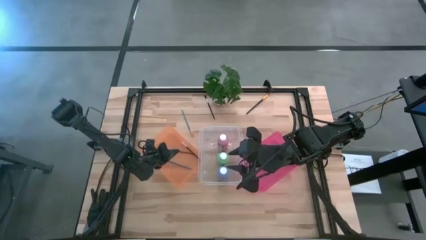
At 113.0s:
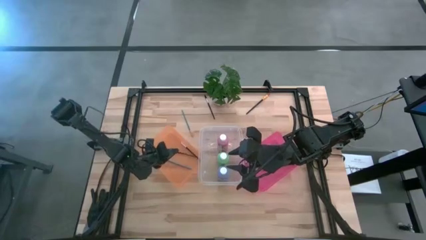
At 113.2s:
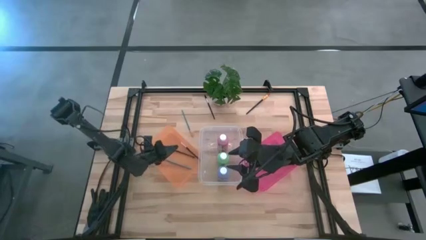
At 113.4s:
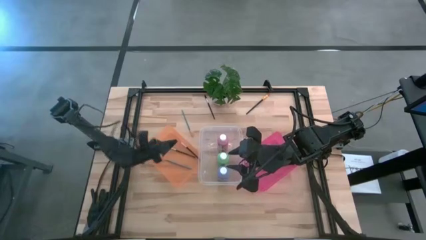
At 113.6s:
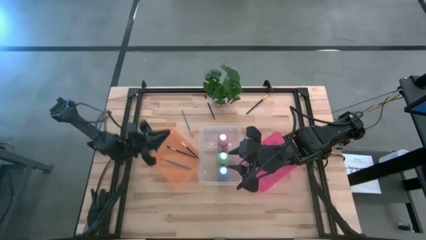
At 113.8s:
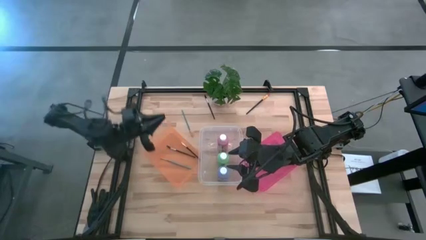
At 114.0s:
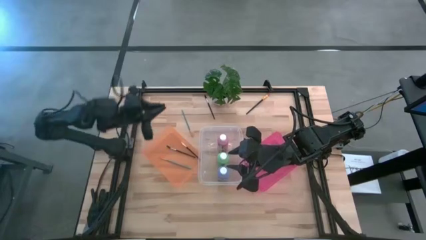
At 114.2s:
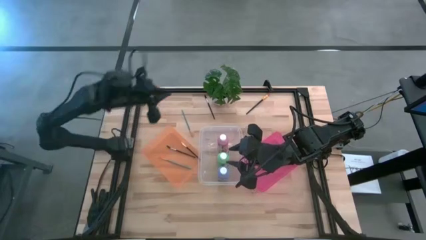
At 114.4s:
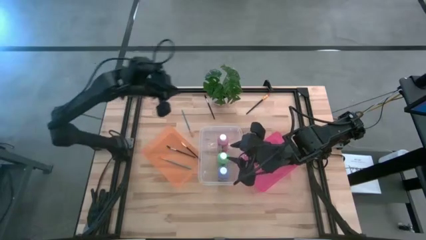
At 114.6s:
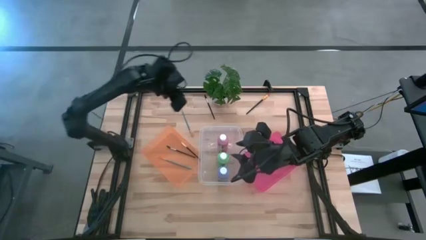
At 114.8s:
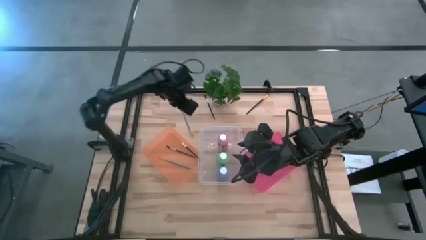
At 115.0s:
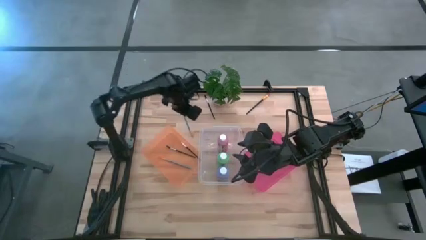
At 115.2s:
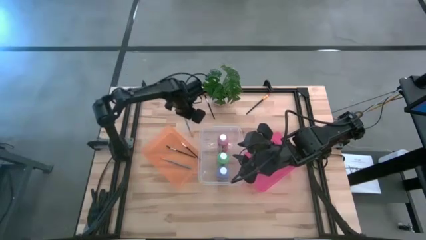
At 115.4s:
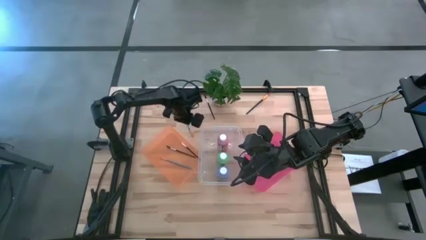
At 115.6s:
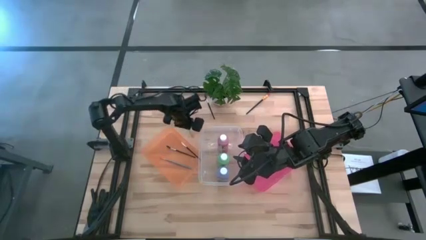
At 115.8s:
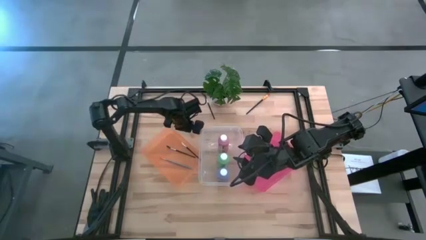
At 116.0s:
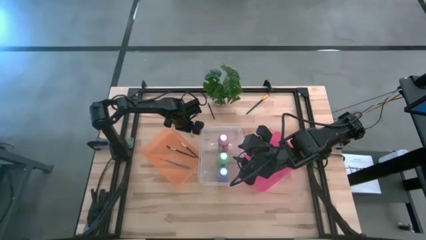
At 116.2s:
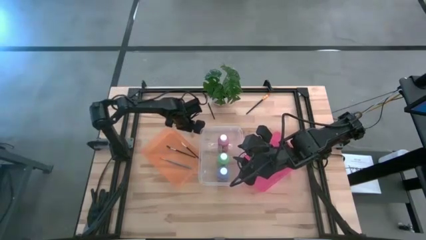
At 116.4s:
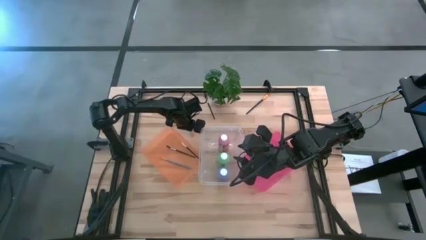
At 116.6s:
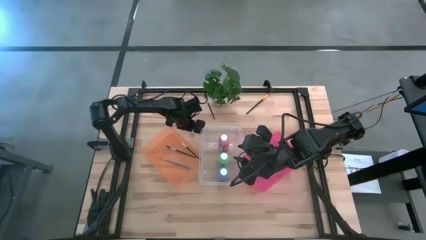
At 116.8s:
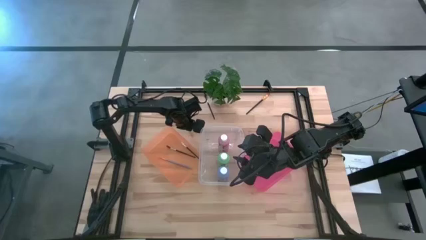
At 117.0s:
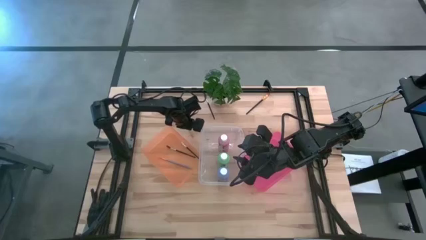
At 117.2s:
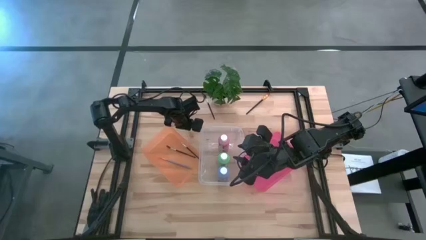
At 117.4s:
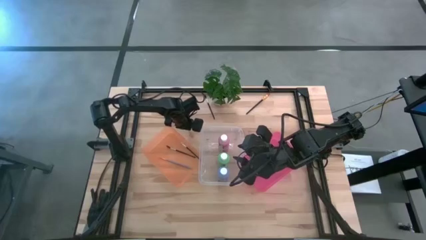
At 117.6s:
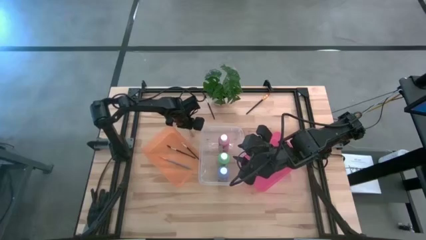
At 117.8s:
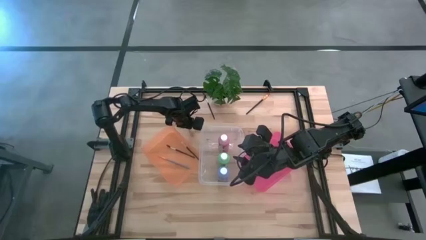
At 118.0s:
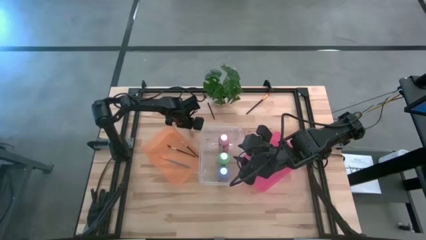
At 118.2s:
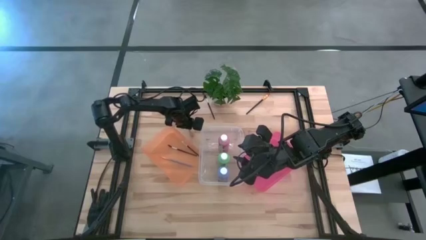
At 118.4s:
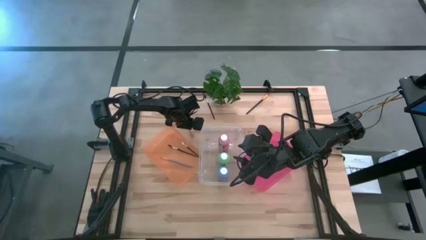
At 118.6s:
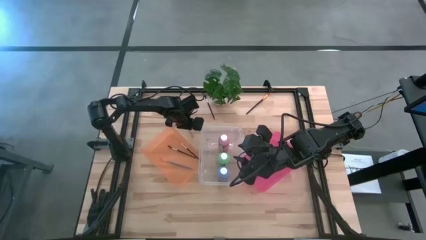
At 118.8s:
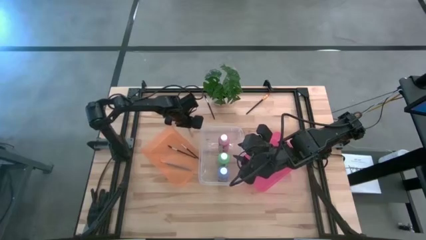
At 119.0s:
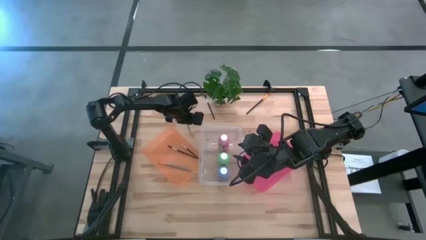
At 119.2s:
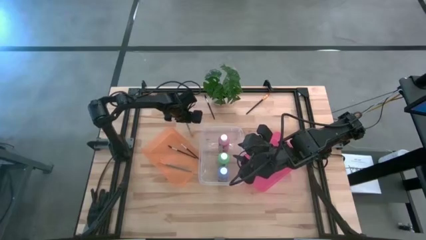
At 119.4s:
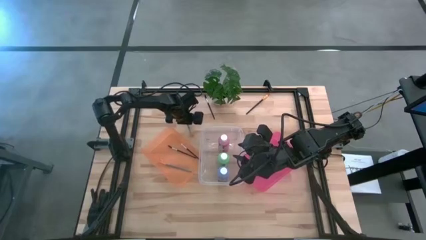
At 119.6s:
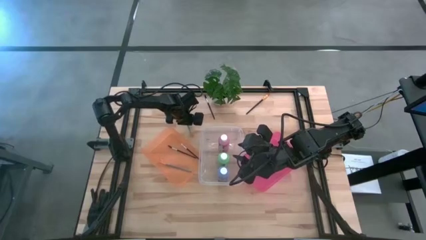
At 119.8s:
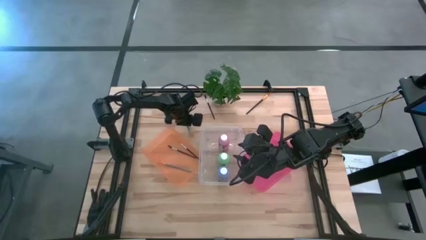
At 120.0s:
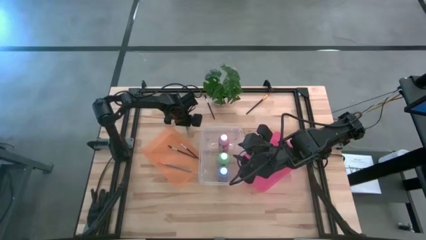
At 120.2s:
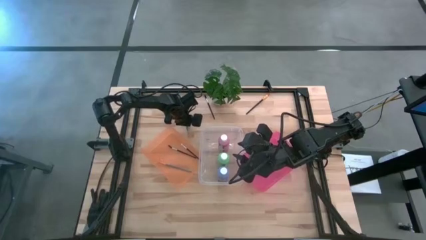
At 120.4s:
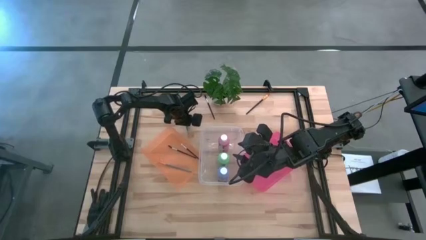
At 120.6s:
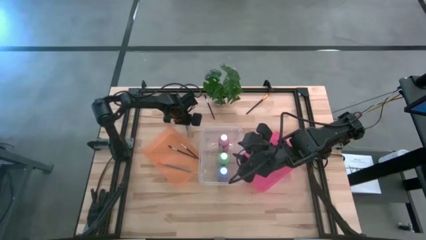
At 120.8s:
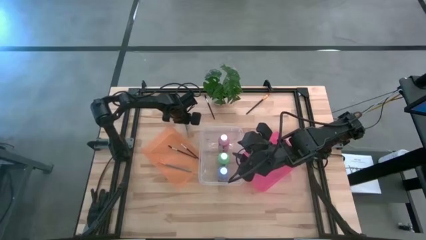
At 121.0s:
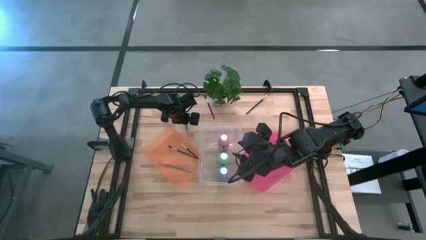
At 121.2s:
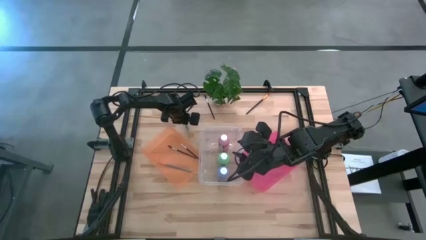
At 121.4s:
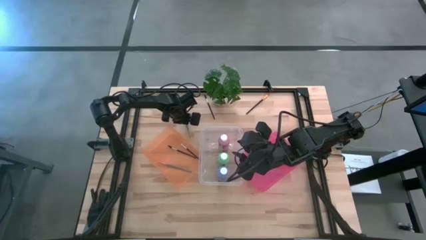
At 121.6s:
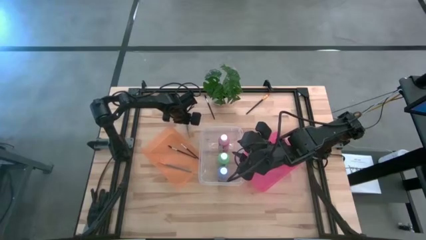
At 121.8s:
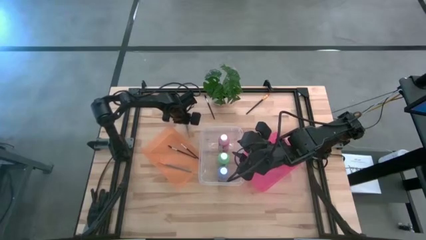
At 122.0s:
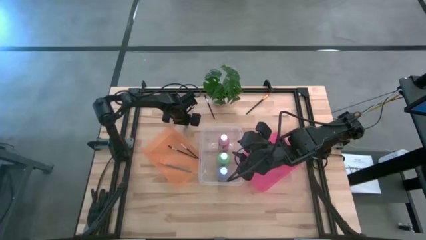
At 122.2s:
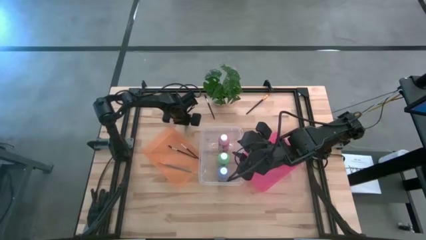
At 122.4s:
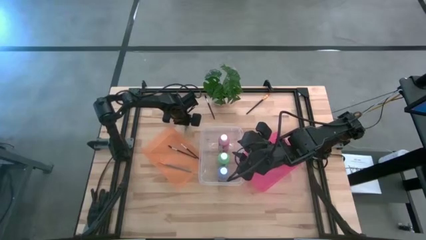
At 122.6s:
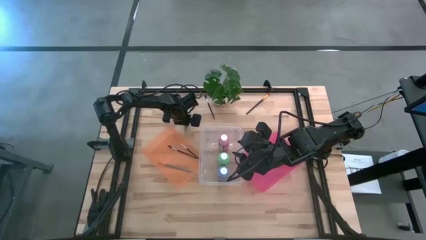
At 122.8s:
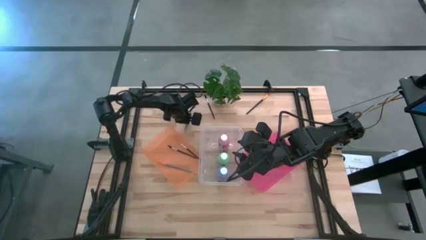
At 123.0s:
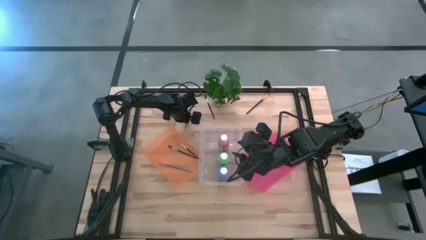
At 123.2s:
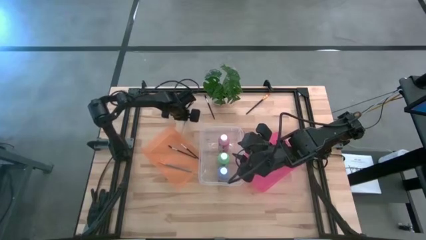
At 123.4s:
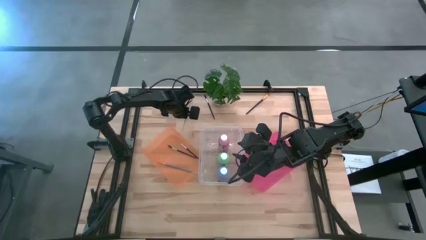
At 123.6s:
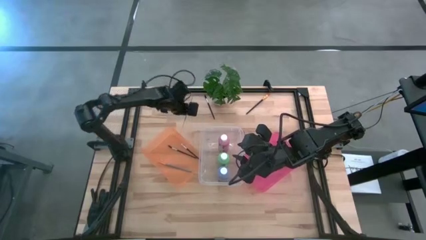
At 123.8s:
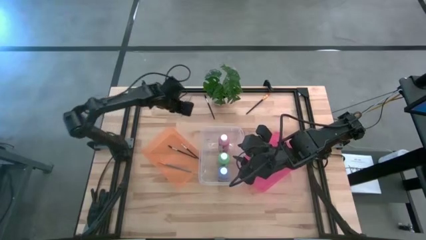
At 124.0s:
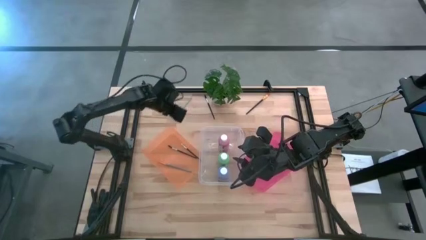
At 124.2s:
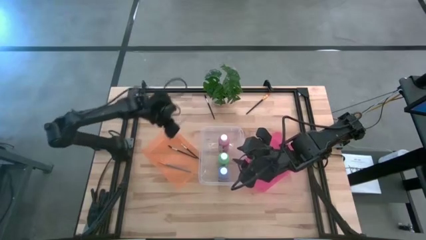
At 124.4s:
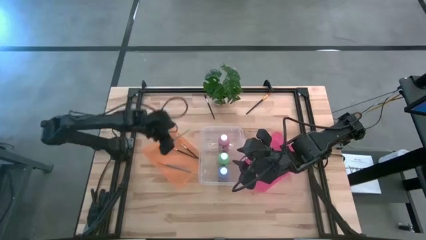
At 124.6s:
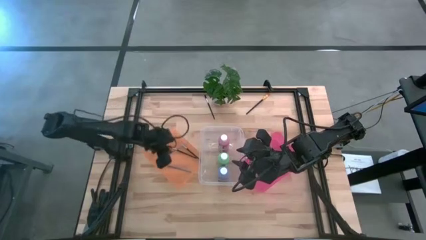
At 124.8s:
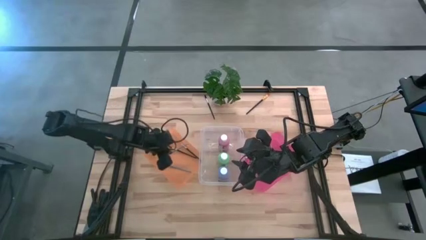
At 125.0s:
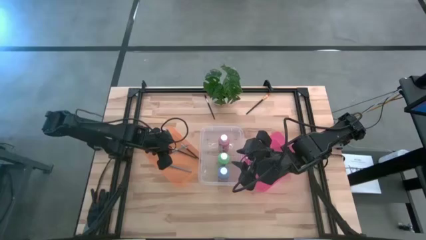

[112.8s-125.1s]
Task: Pick & Place Paint Supplies
Put the blue paintbrush into the orange bin

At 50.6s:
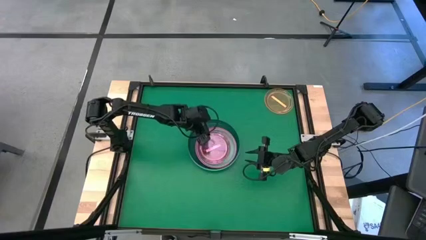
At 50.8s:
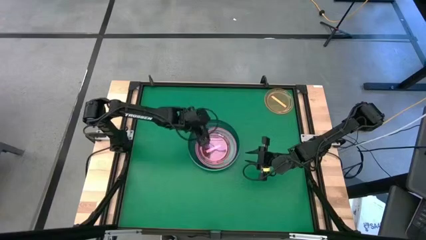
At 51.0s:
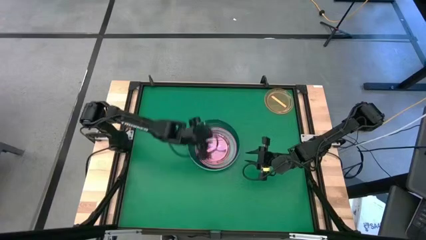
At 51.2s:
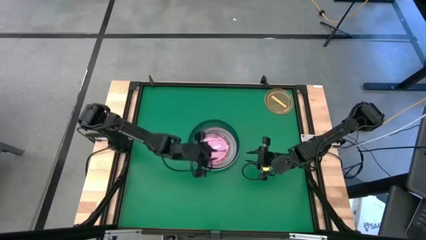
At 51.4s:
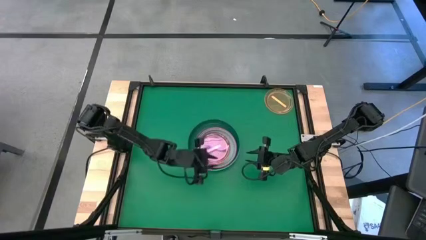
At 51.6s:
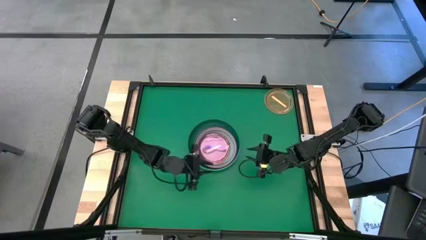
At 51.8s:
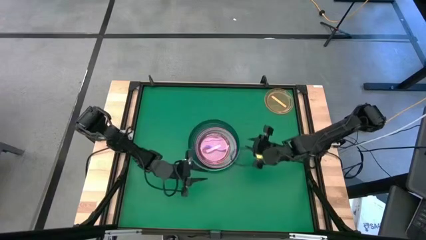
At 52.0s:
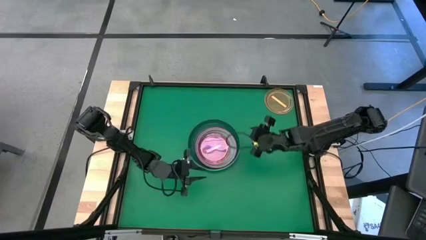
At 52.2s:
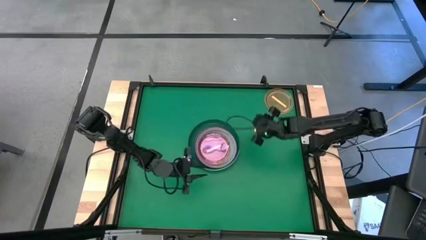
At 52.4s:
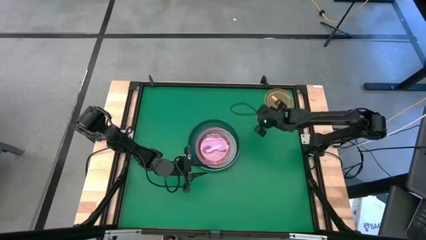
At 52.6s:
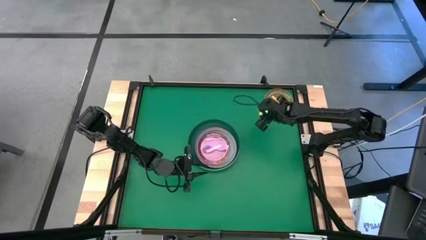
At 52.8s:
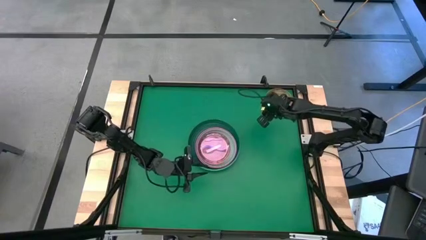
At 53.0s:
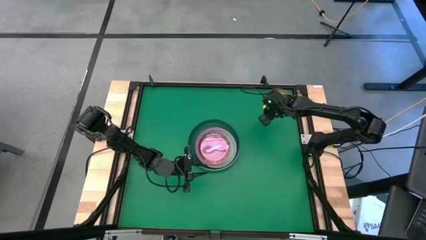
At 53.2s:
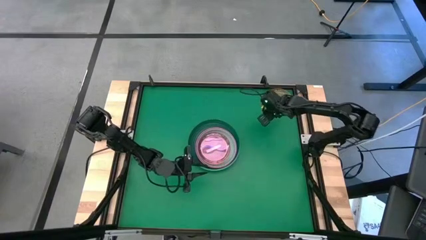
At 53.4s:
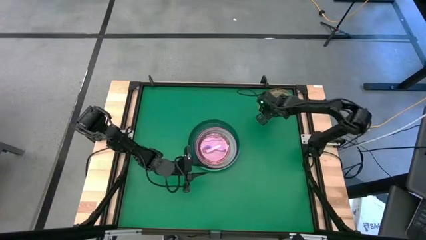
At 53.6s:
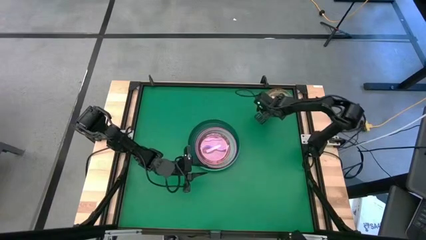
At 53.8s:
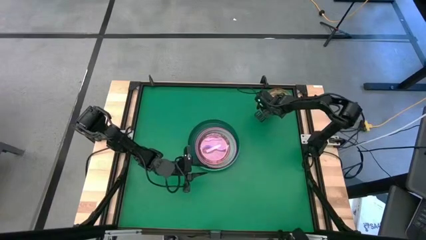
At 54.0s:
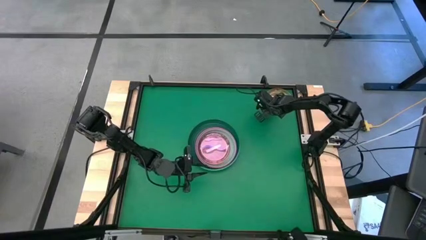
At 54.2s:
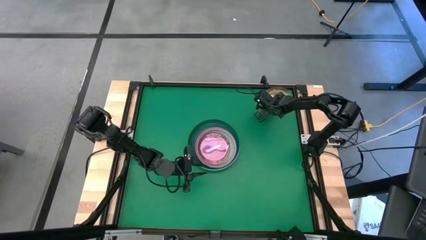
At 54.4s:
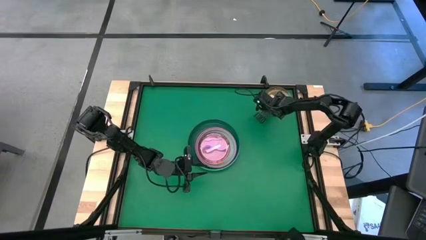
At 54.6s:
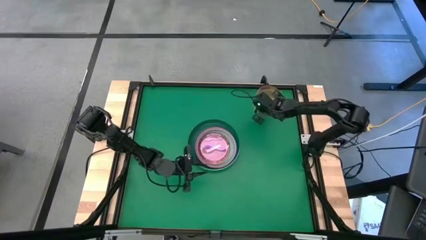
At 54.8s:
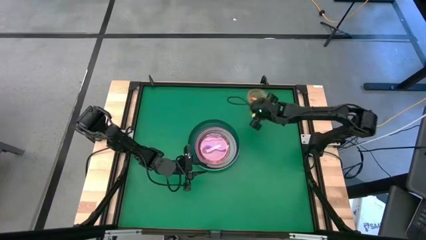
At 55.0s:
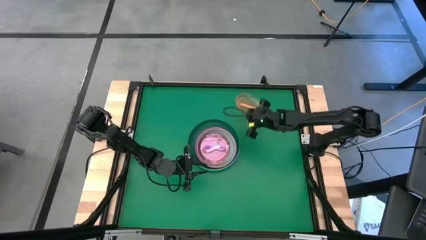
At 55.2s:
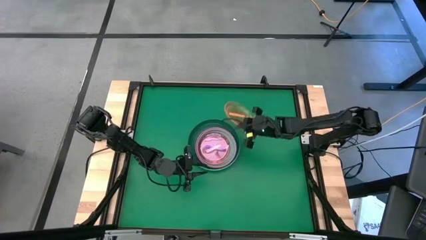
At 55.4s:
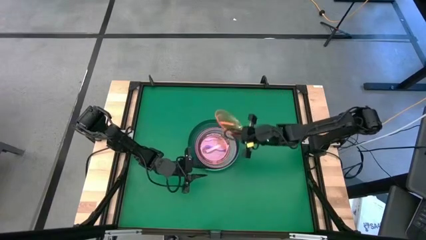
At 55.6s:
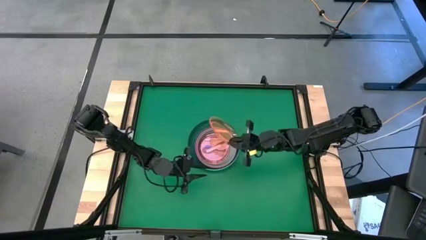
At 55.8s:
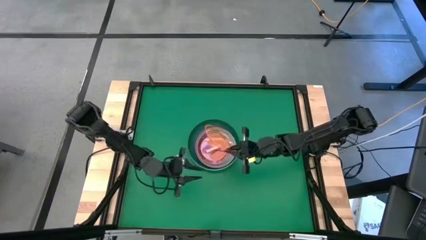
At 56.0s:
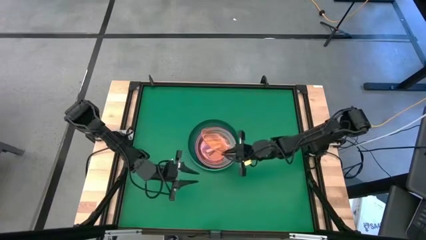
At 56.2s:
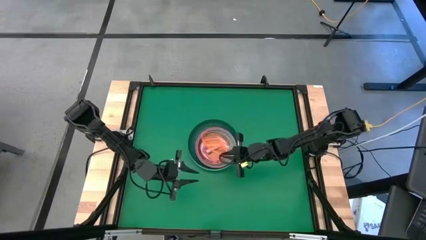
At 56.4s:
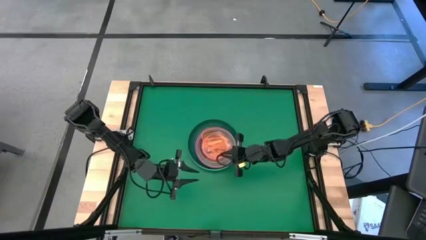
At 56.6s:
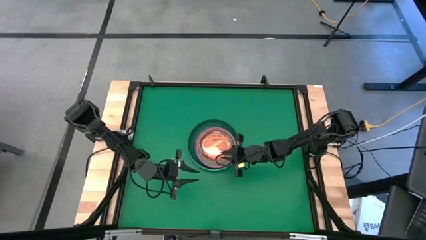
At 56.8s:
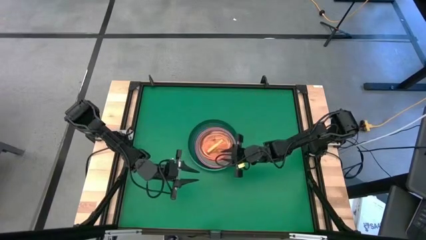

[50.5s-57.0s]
Task: Stack plastic plates
Stack the orange plate on top of the pink plate
